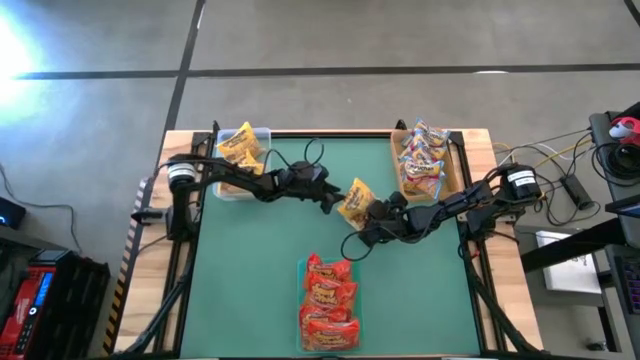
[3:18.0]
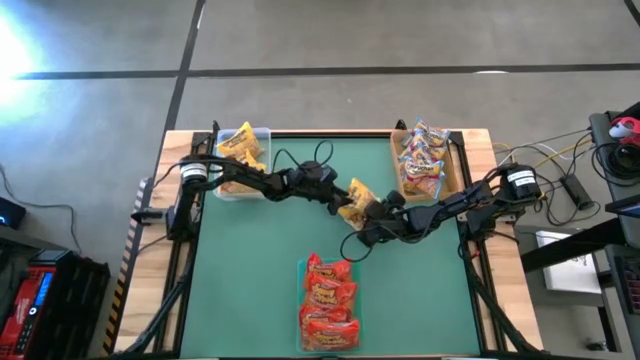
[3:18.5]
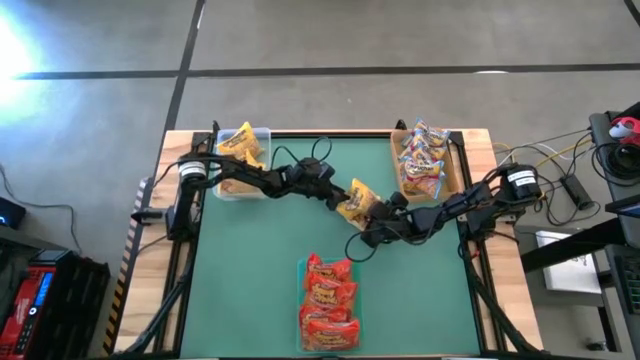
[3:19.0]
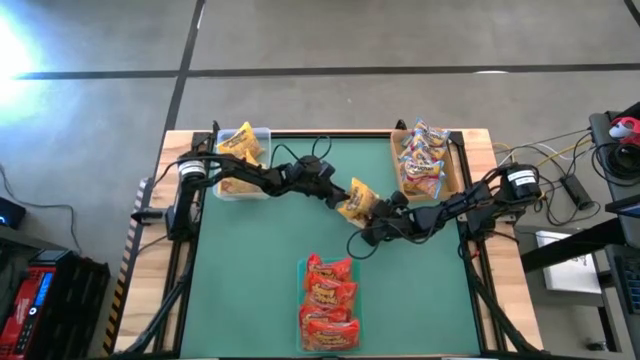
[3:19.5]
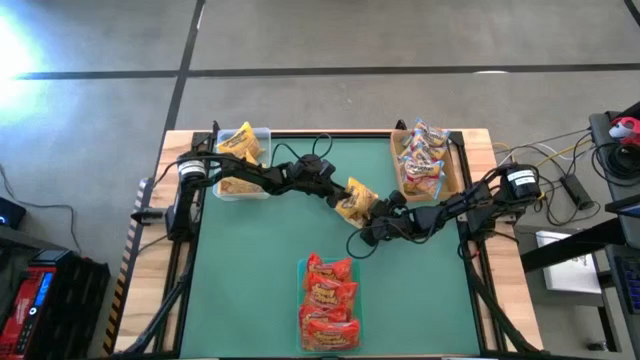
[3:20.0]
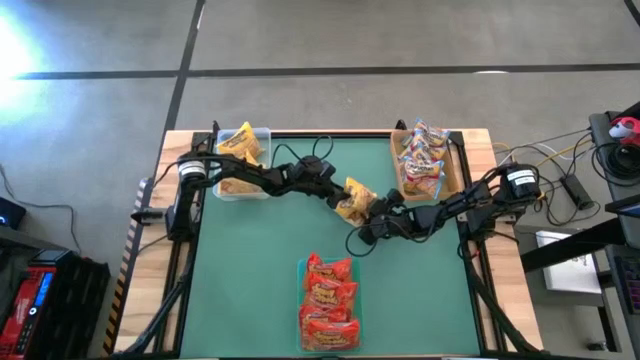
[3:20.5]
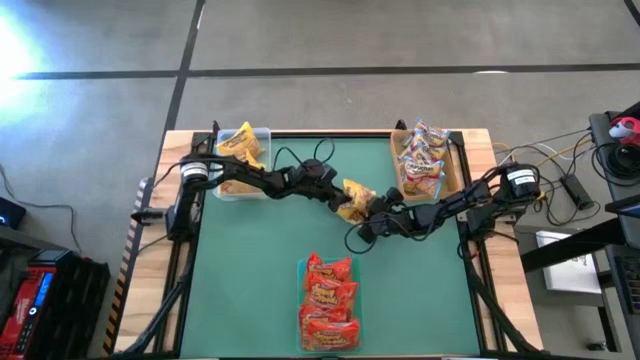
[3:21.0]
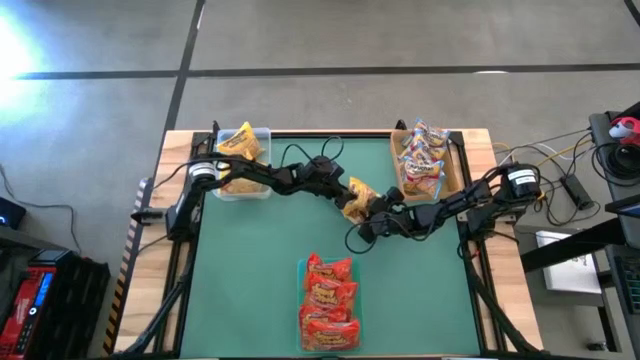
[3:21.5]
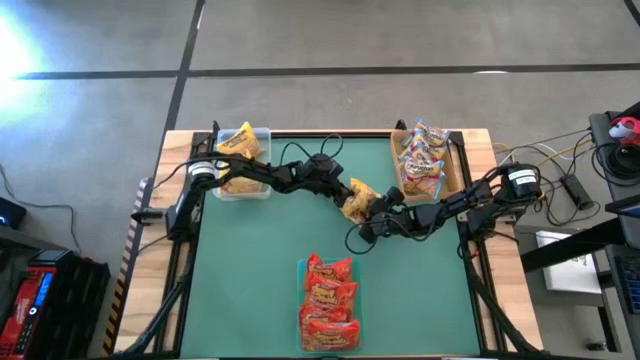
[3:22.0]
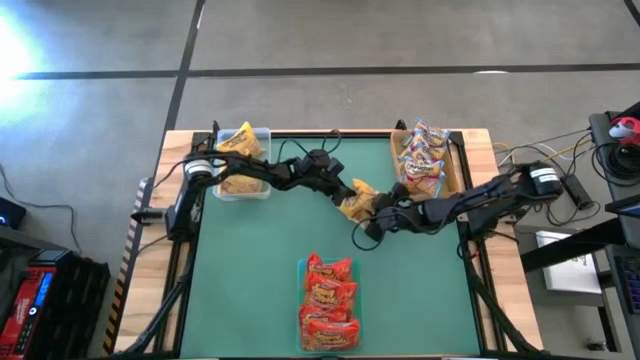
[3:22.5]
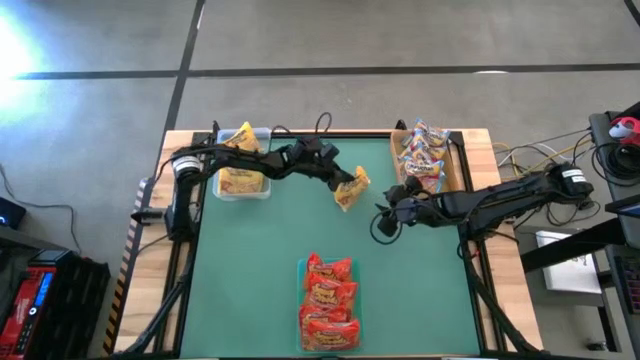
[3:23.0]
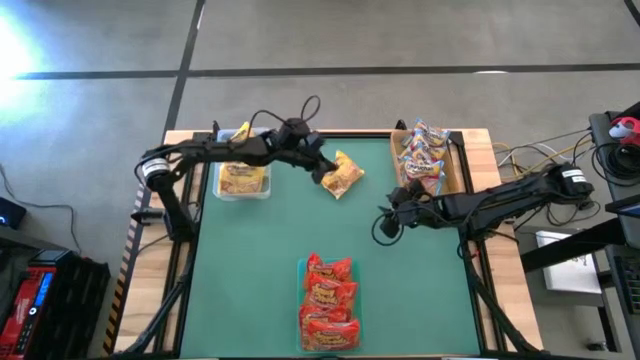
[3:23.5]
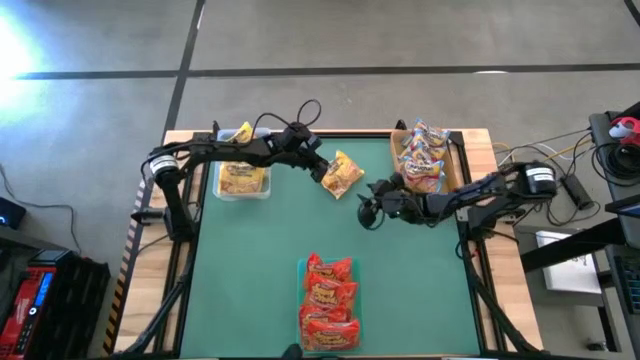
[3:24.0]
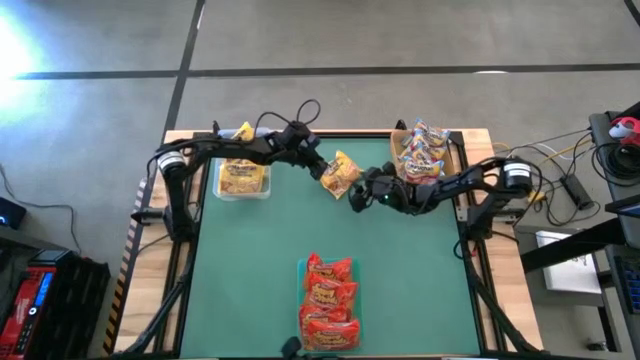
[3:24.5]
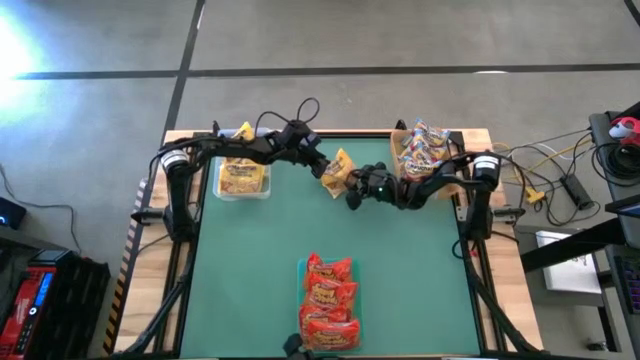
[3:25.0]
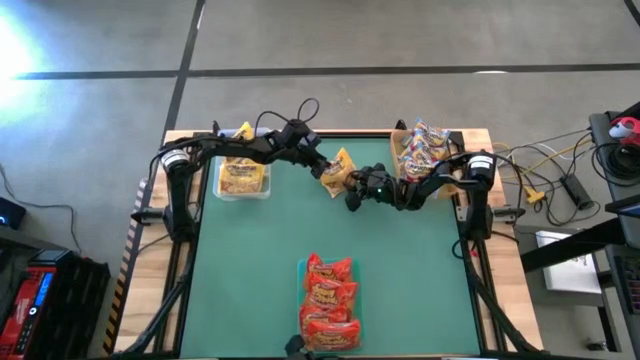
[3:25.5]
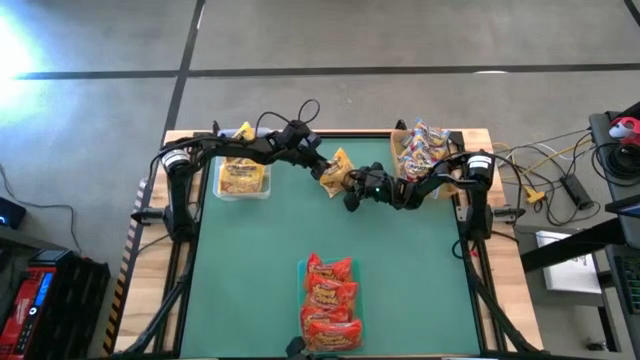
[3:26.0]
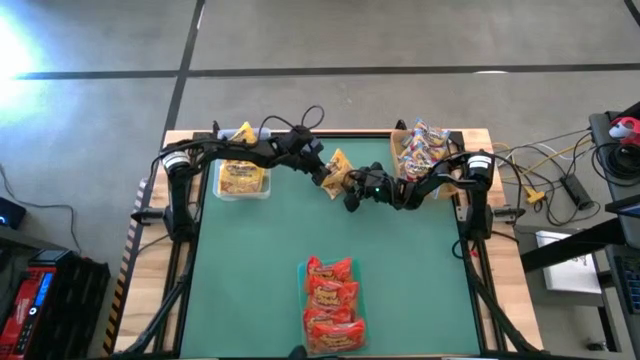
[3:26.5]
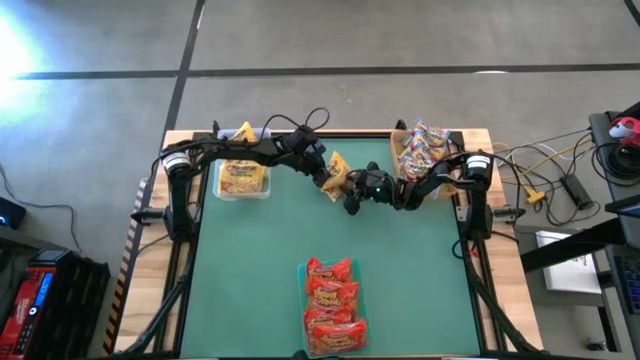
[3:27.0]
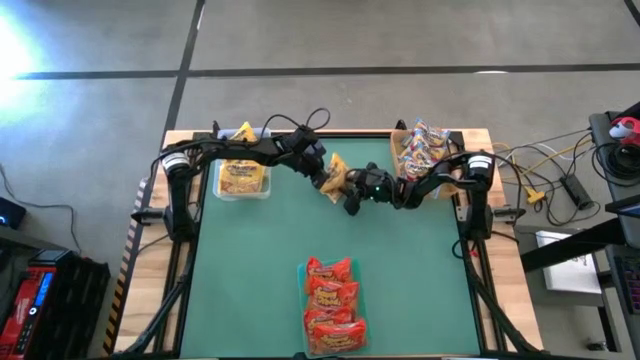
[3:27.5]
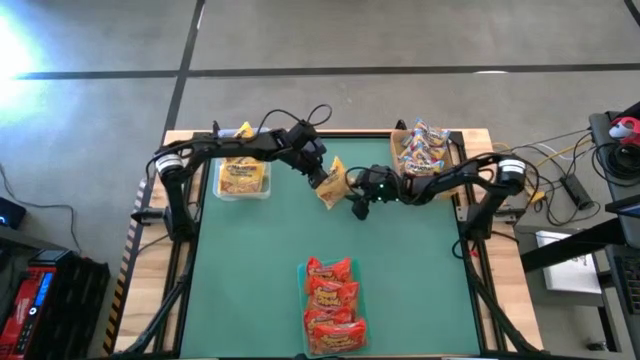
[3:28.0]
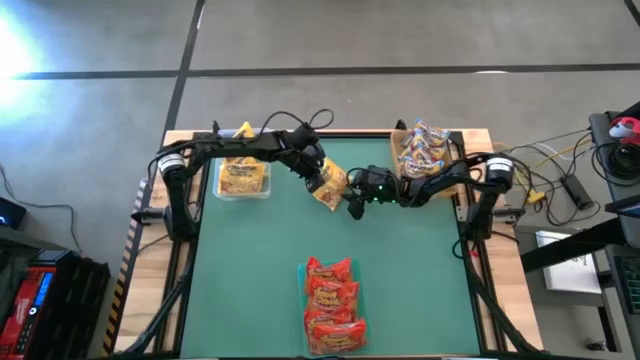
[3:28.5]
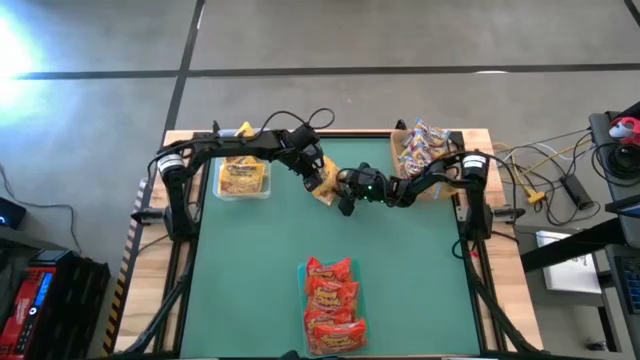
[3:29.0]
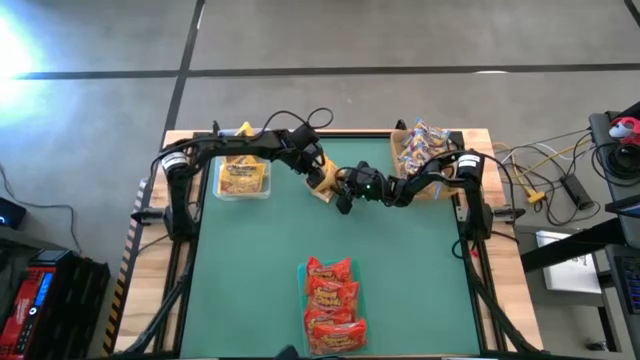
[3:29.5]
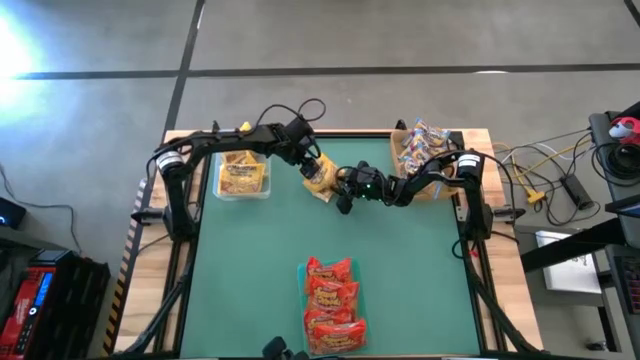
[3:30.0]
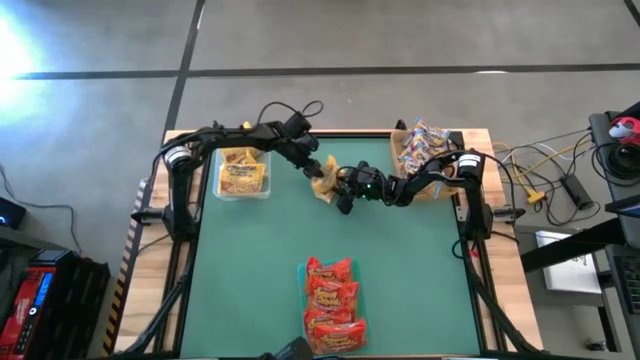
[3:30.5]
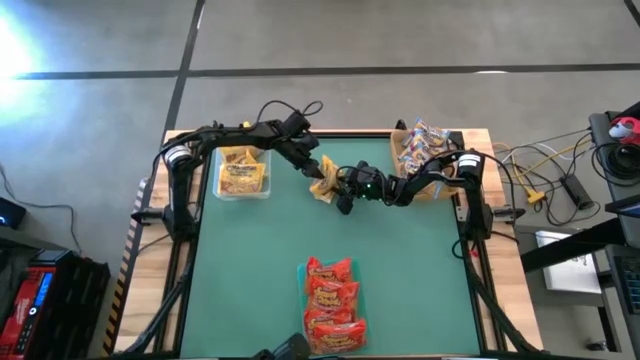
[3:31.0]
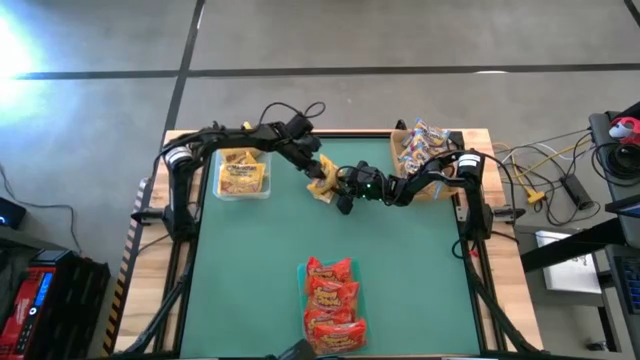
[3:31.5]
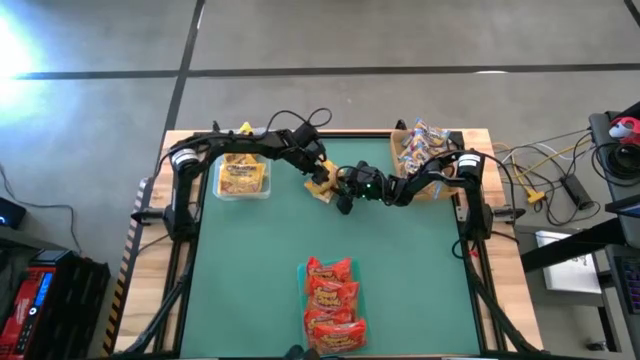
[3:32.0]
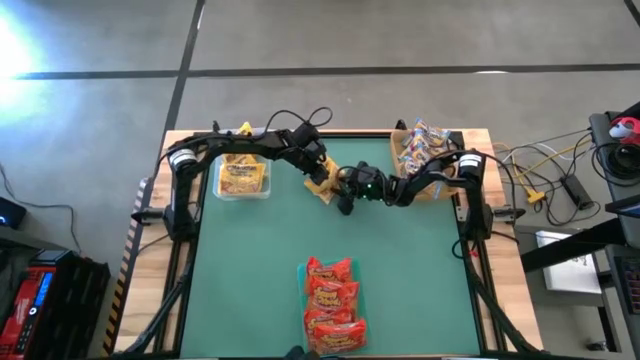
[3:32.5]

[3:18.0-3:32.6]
Task: Sort Maruchan noodles
Put the yellow noodle pack into the transparent bin

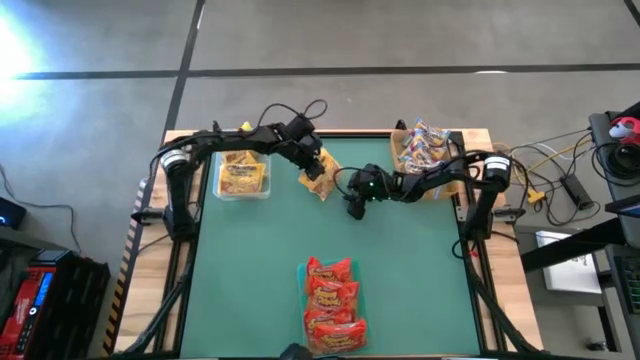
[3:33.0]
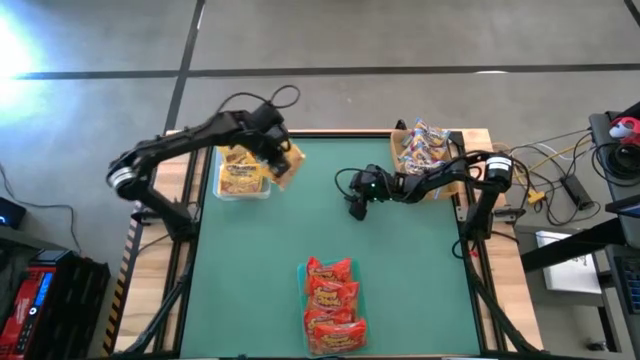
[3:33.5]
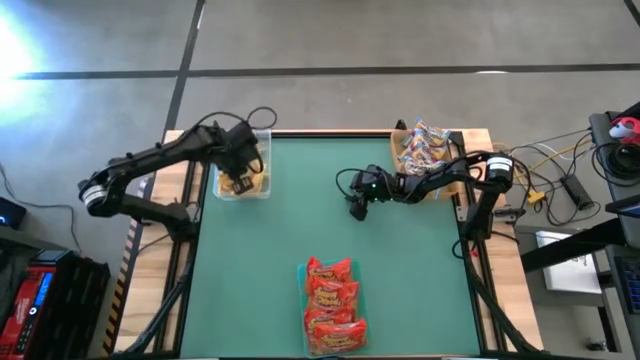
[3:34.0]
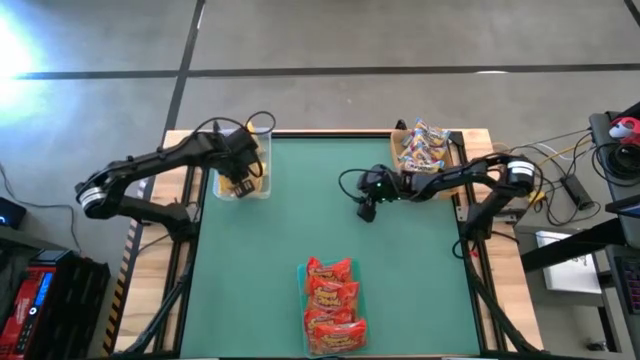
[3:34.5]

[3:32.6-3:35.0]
Put the yellow noodle pack into the transparent bin

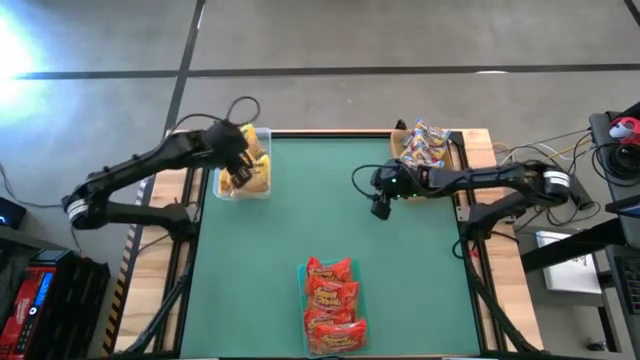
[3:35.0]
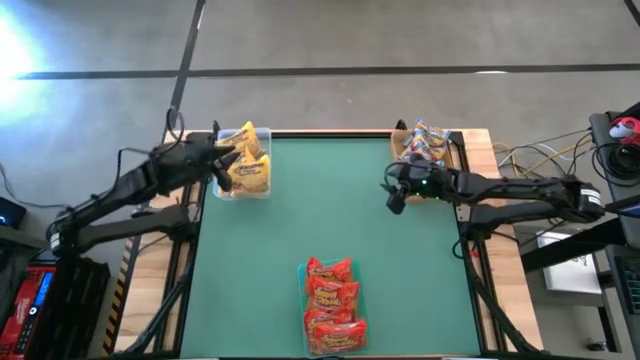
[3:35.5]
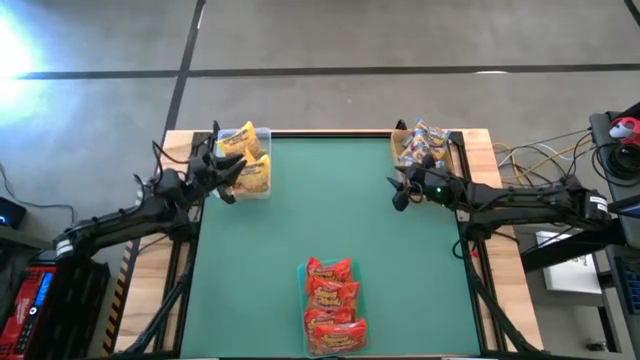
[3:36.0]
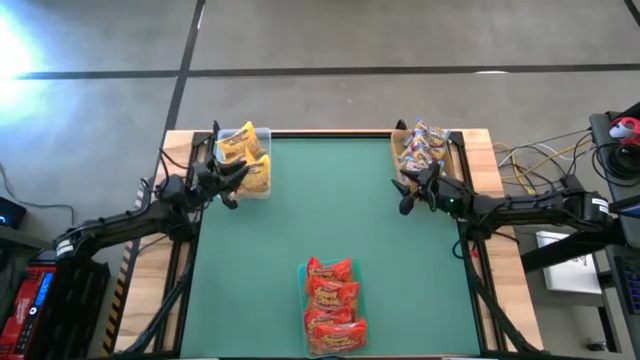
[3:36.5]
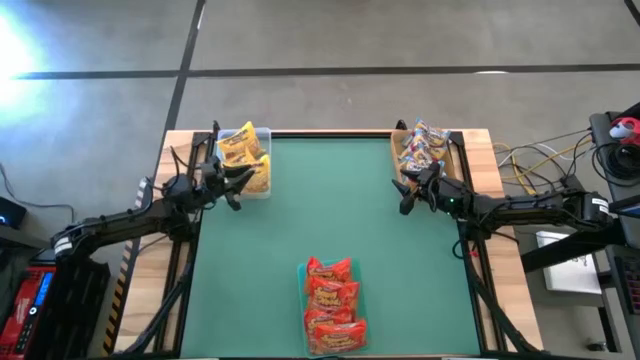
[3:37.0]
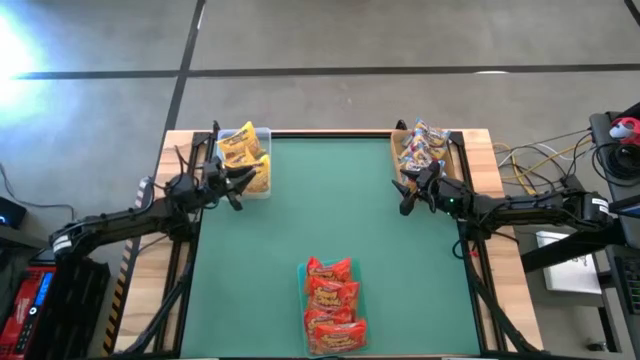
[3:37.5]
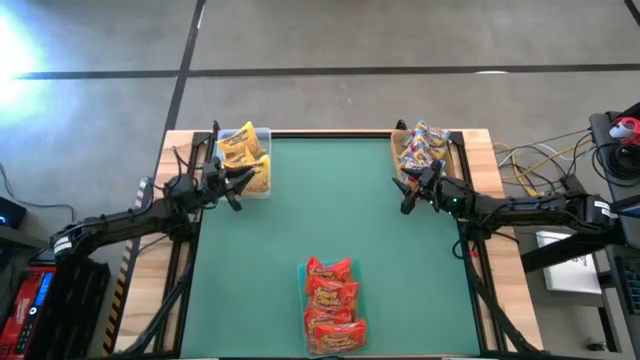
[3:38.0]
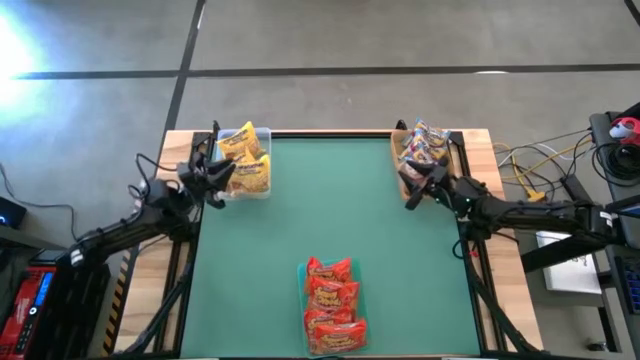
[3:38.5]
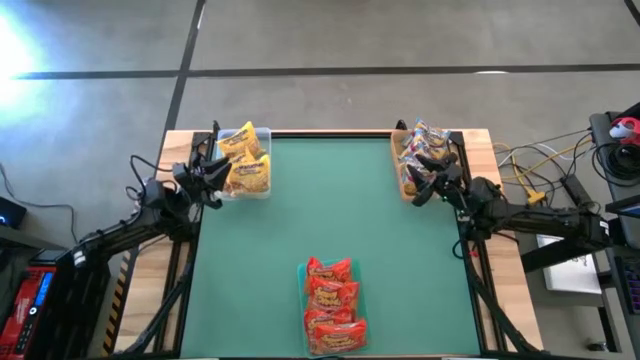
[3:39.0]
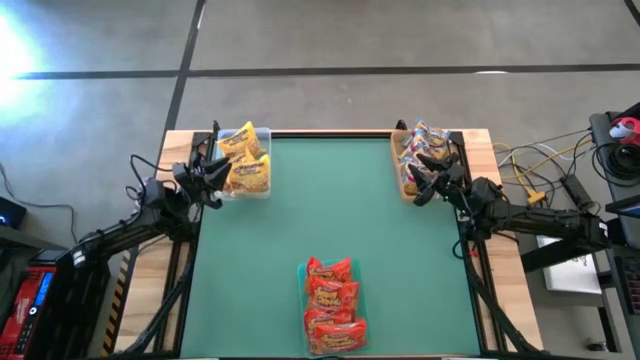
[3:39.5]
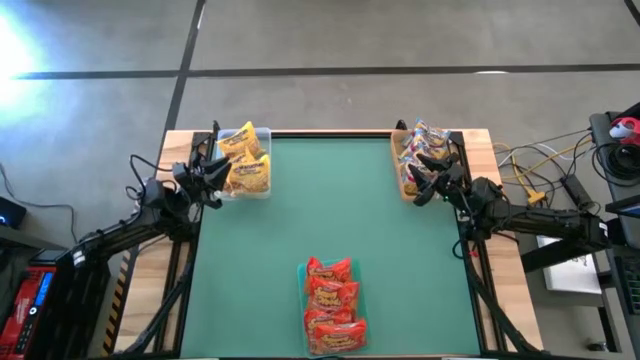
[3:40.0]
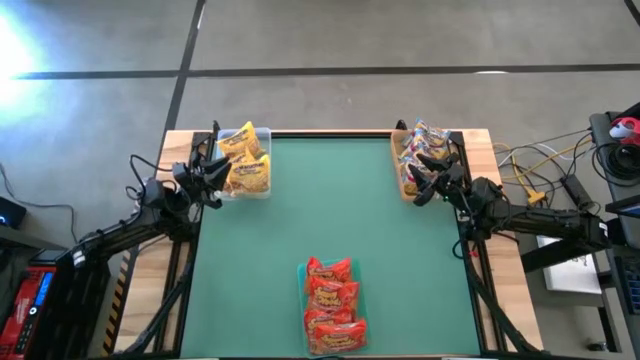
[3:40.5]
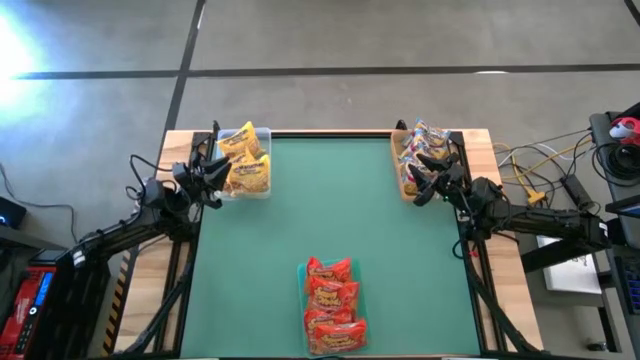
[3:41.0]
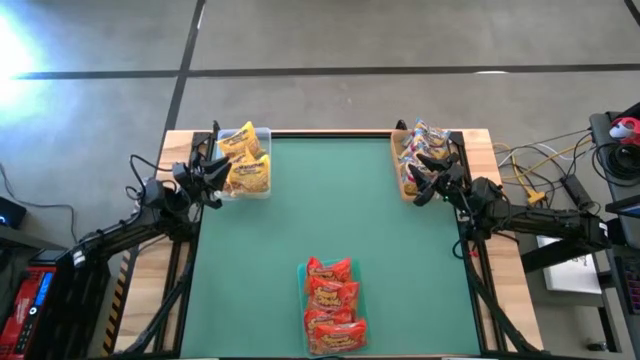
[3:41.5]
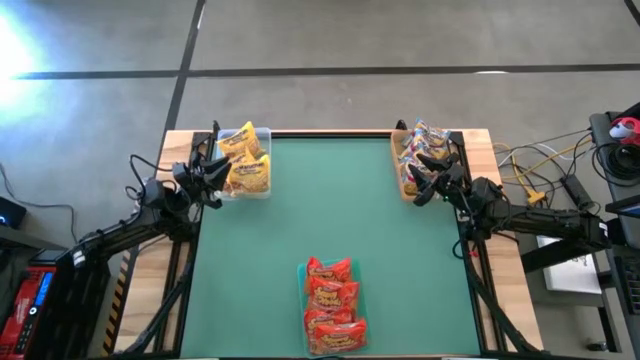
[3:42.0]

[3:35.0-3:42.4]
Return to Home Position
